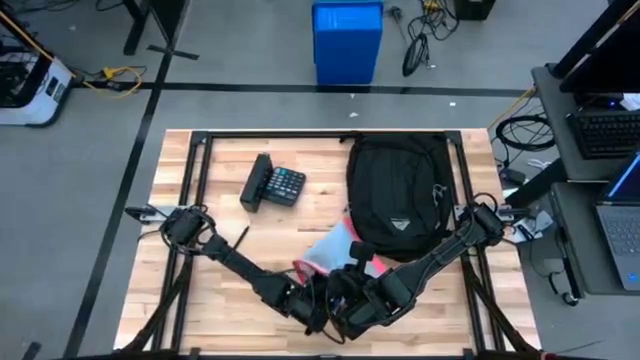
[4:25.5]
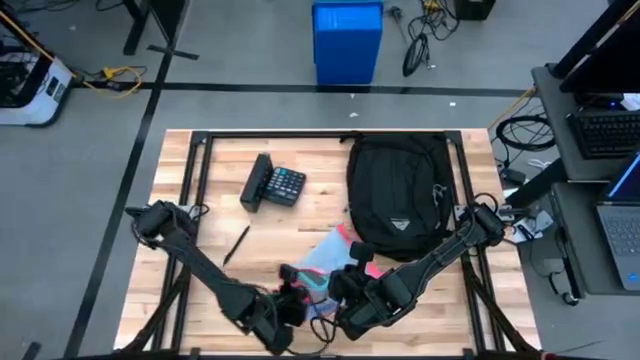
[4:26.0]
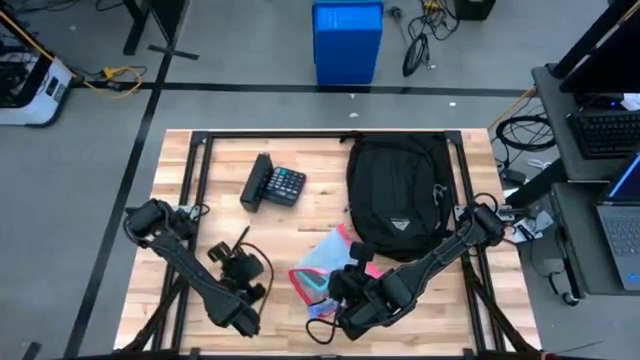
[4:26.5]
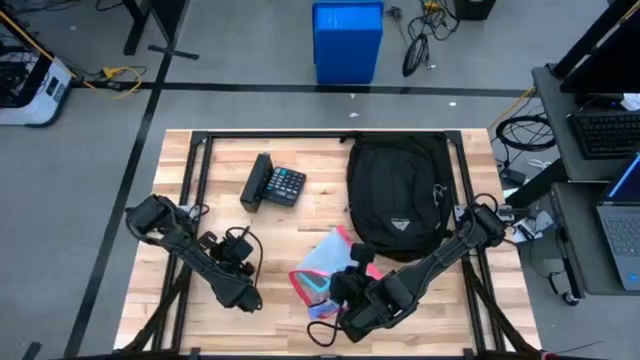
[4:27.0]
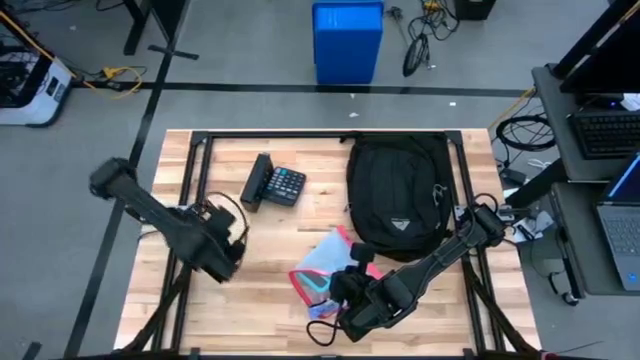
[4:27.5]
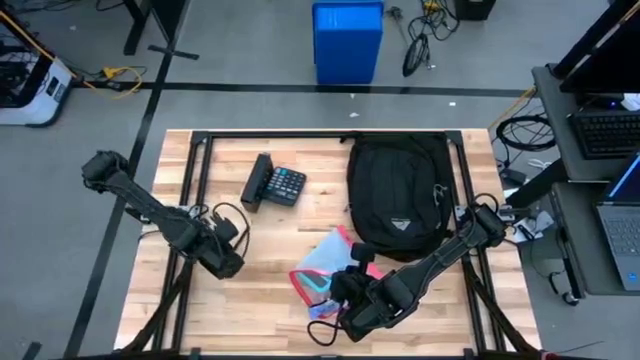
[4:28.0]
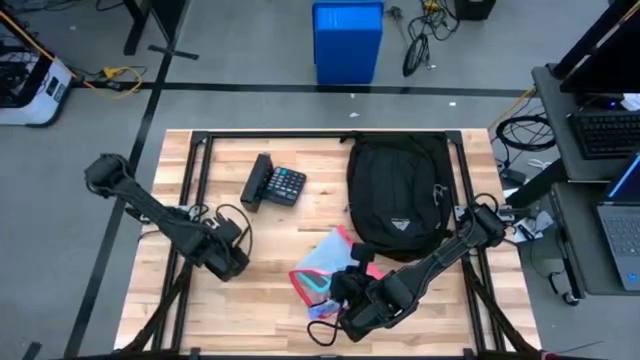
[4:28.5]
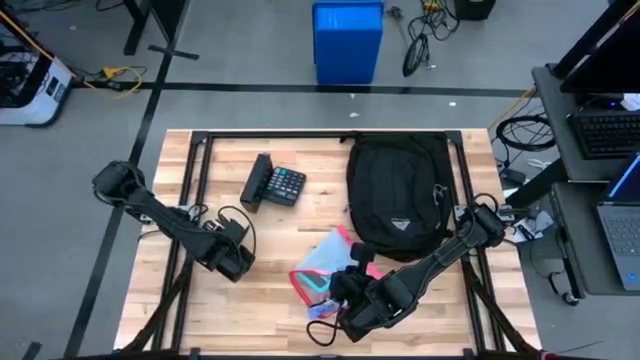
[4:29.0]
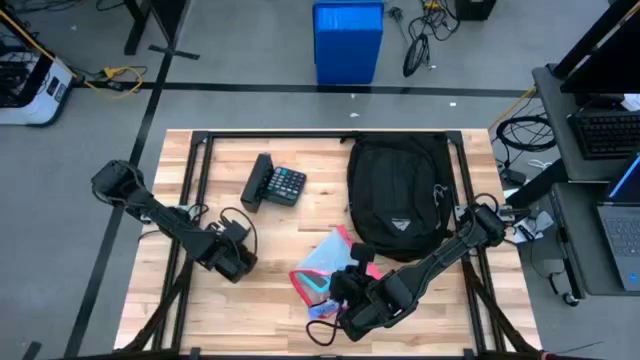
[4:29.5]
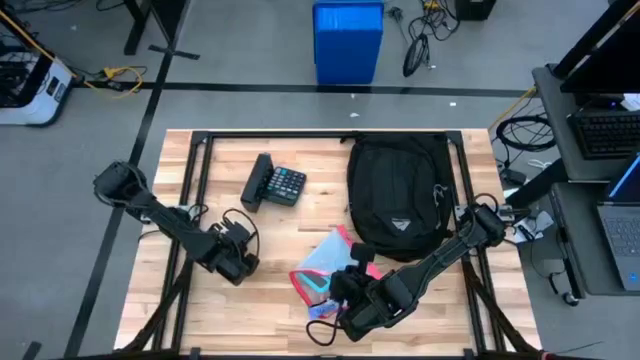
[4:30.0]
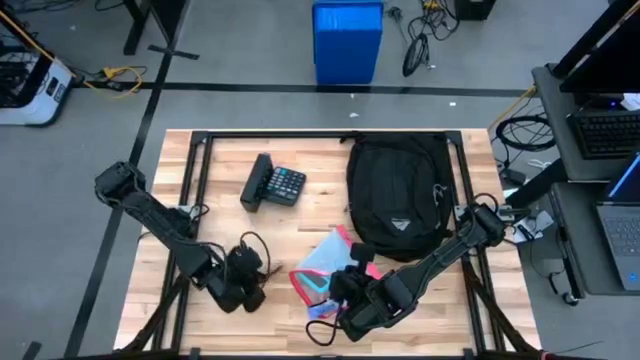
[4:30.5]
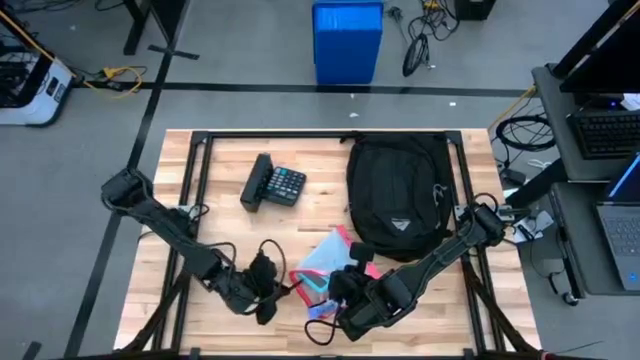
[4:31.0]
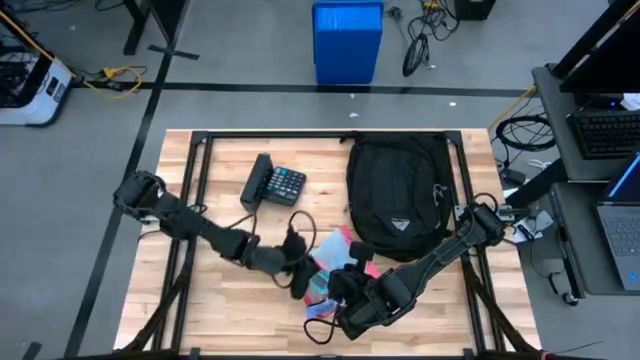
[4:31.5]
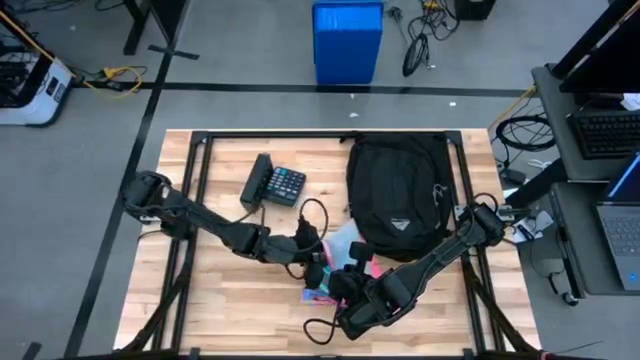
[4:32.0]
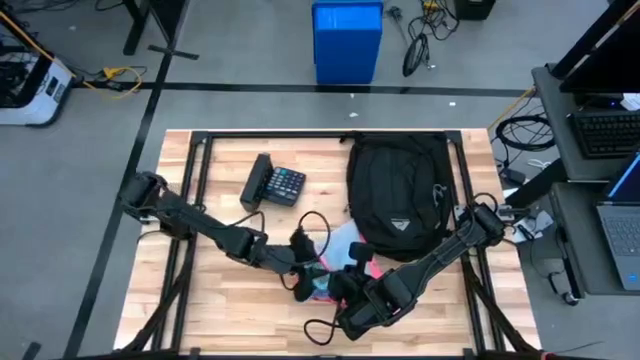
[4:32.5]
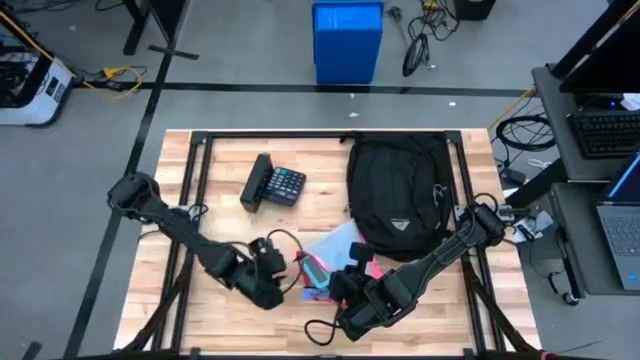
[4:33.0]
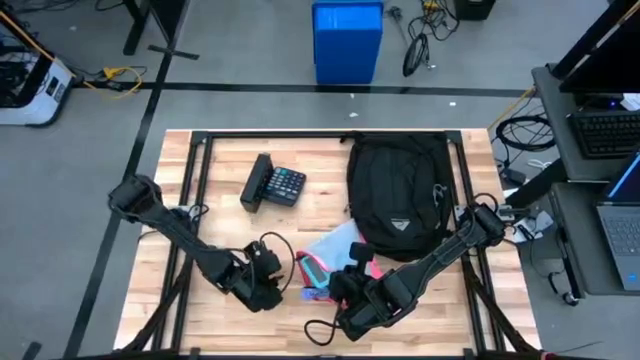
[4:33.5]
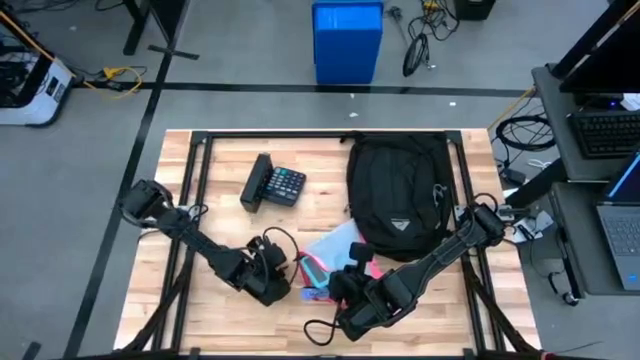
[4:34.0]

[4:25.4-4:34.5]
Task: Unpack backpack
Put the black pen into the white zip bag

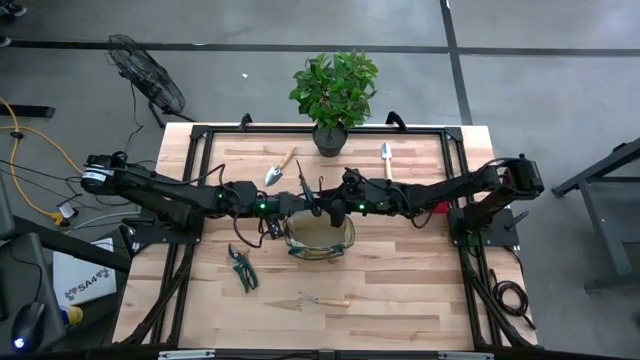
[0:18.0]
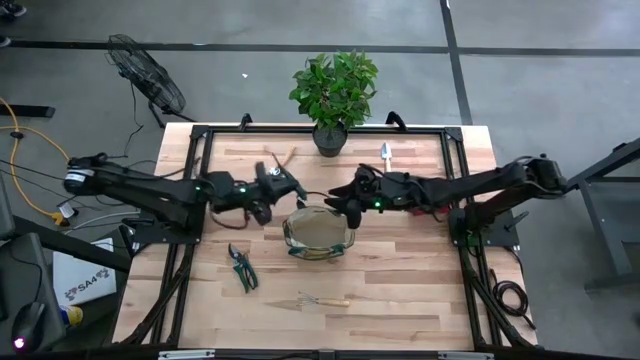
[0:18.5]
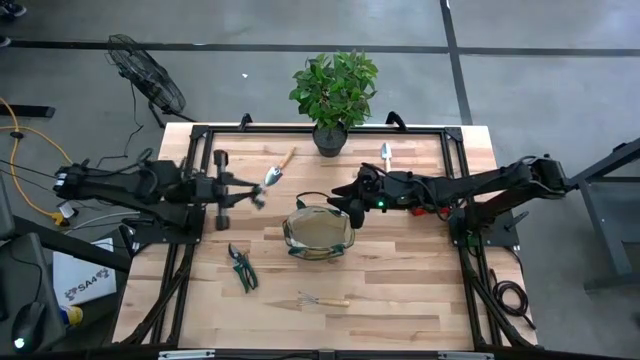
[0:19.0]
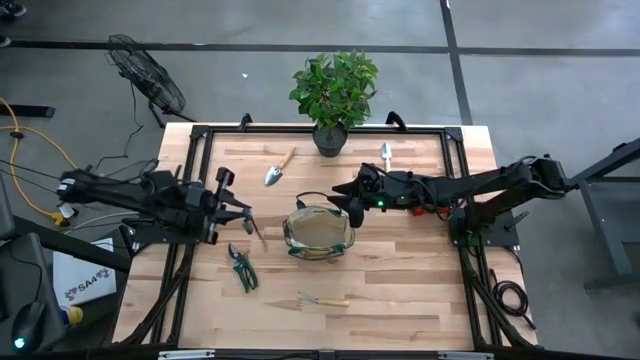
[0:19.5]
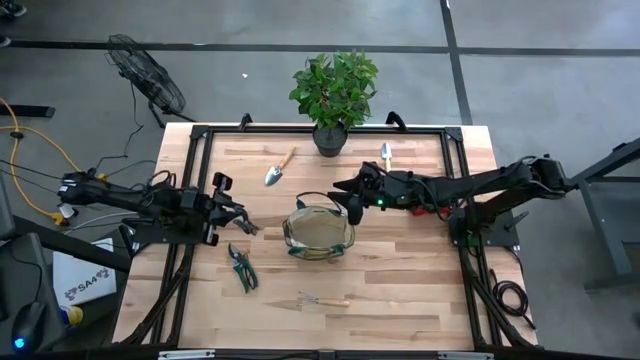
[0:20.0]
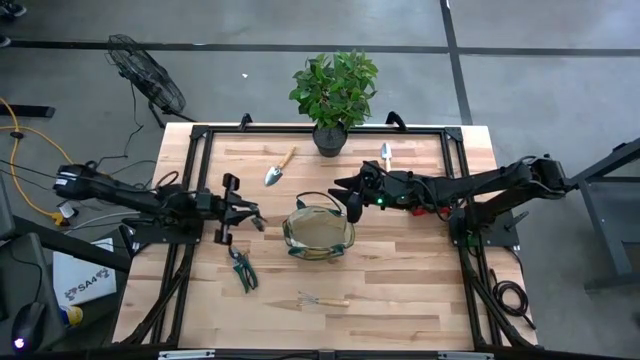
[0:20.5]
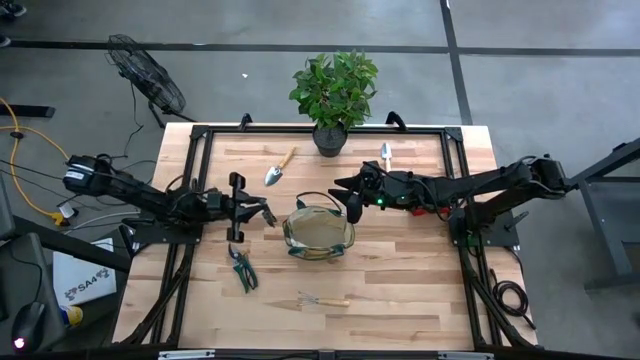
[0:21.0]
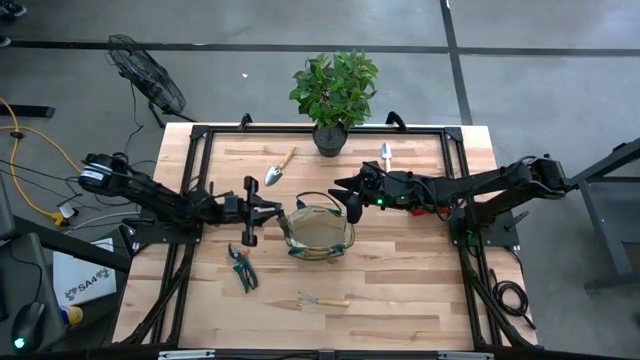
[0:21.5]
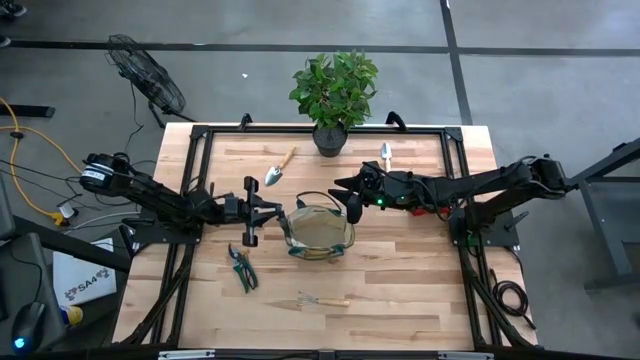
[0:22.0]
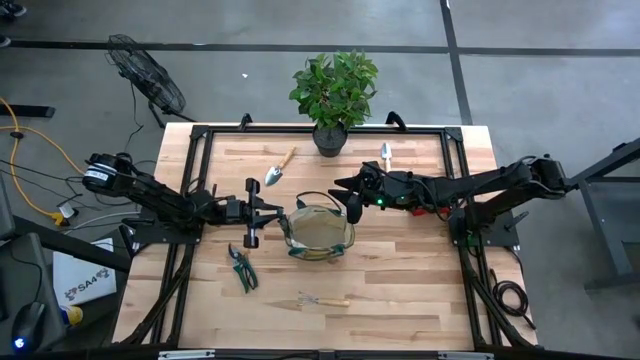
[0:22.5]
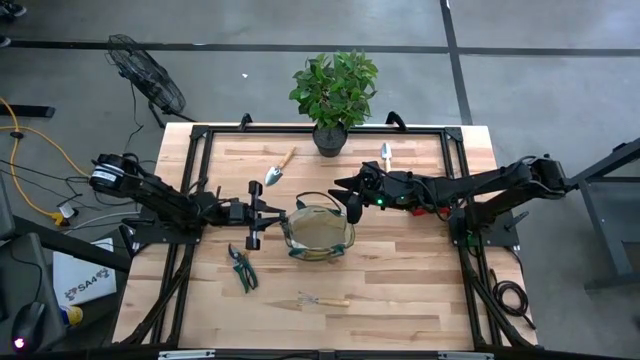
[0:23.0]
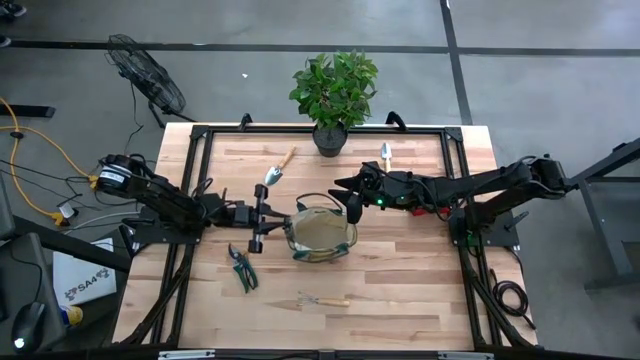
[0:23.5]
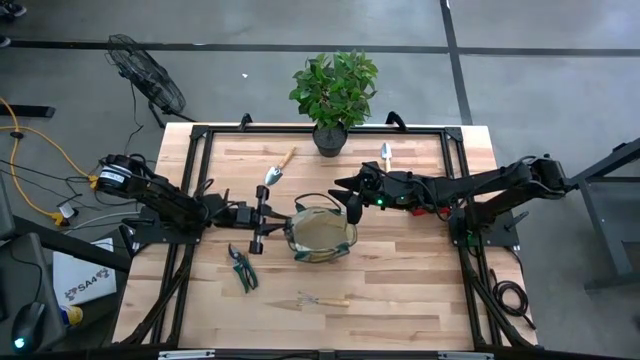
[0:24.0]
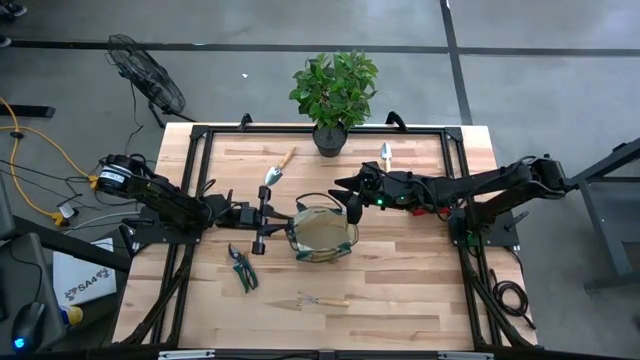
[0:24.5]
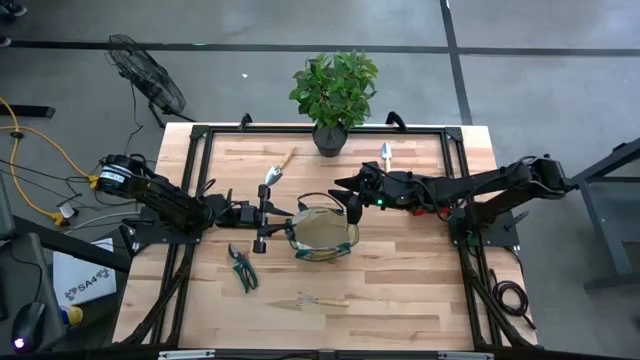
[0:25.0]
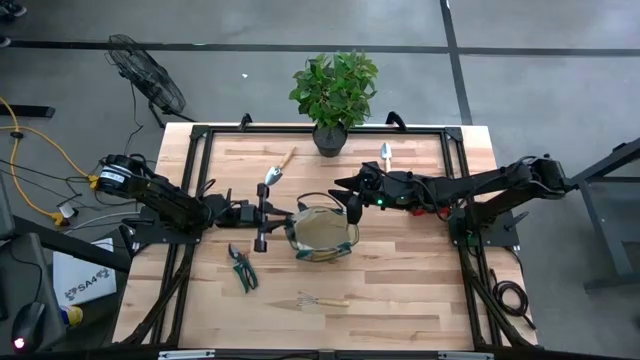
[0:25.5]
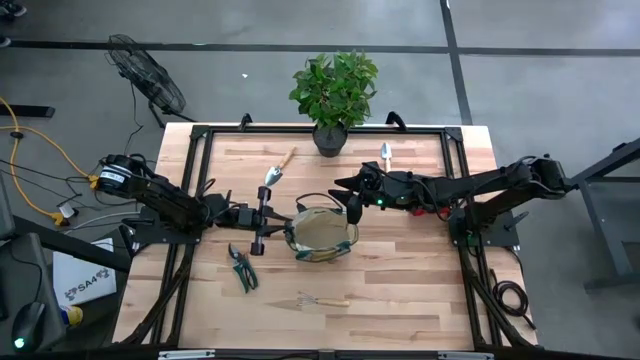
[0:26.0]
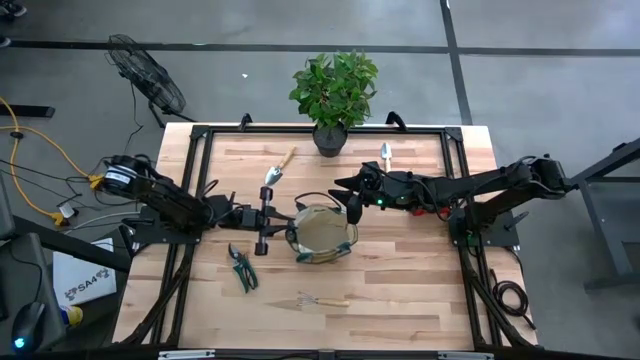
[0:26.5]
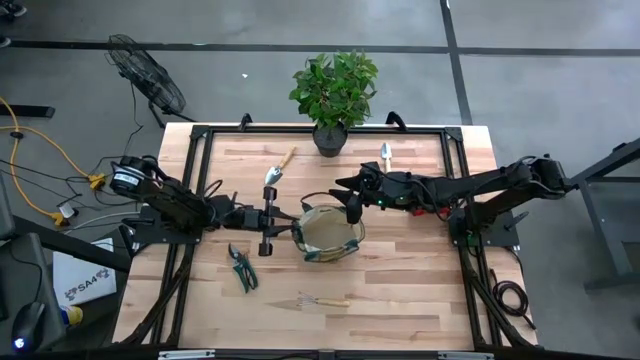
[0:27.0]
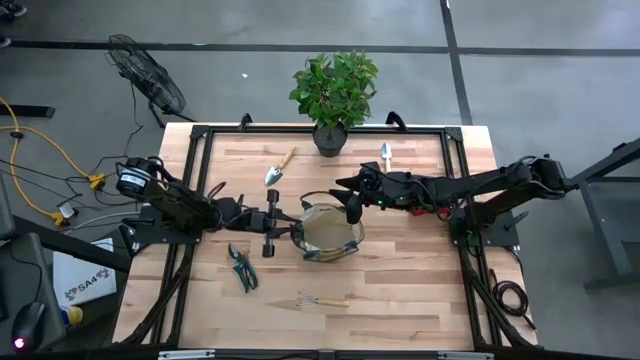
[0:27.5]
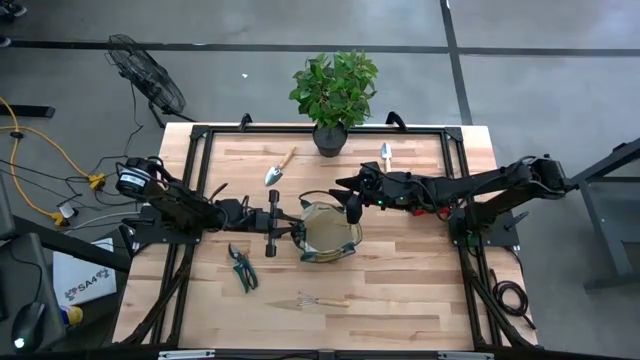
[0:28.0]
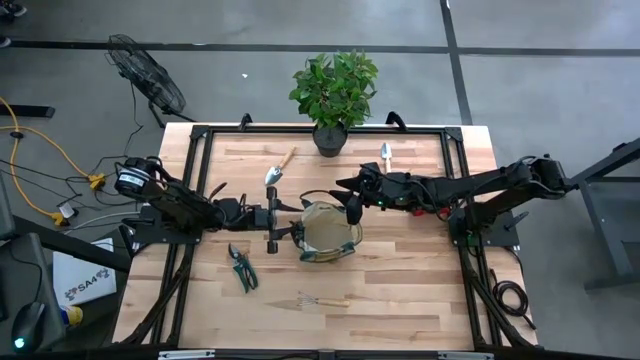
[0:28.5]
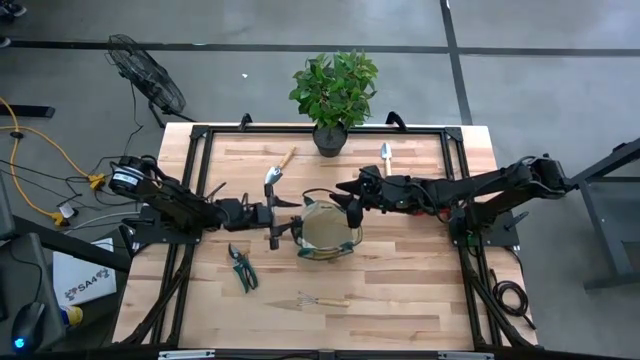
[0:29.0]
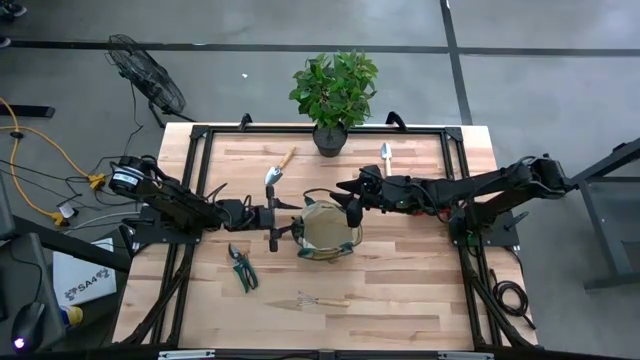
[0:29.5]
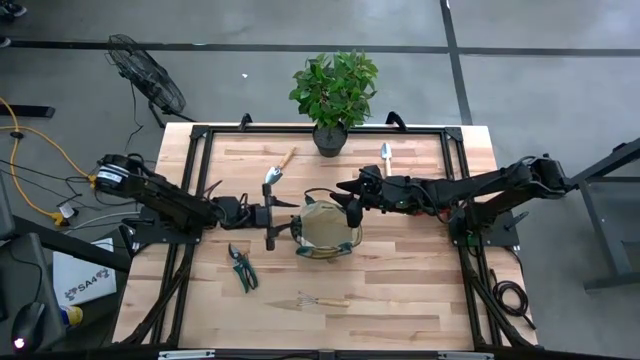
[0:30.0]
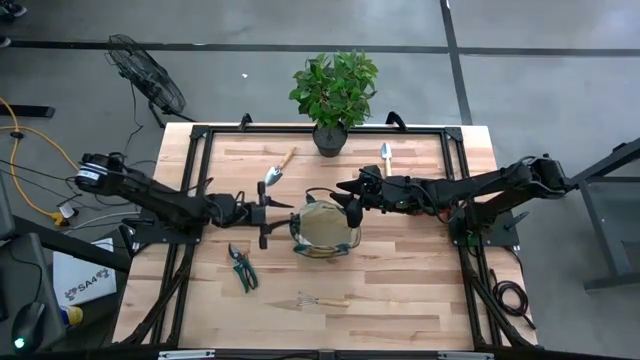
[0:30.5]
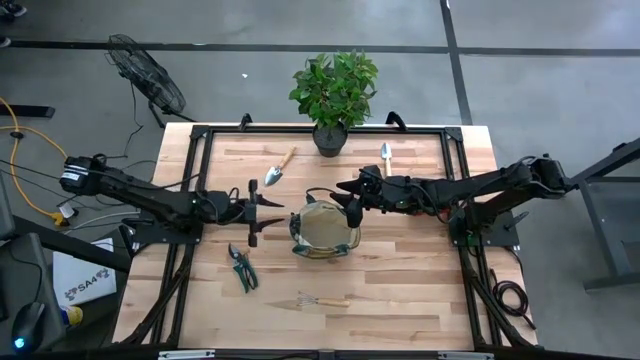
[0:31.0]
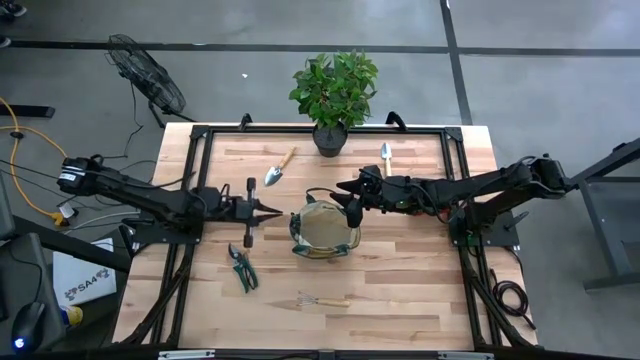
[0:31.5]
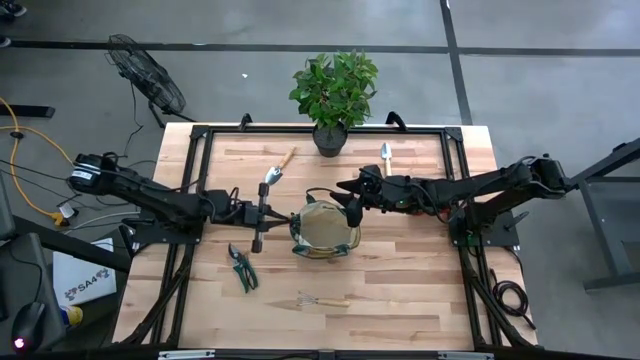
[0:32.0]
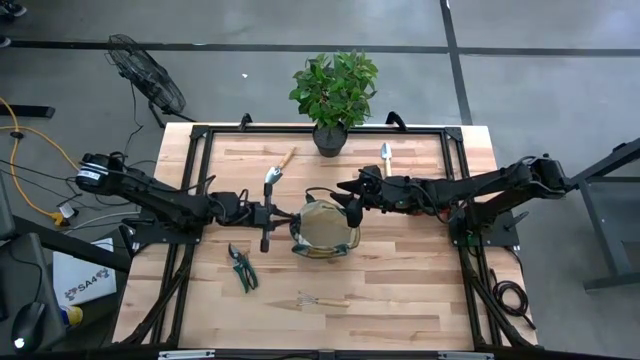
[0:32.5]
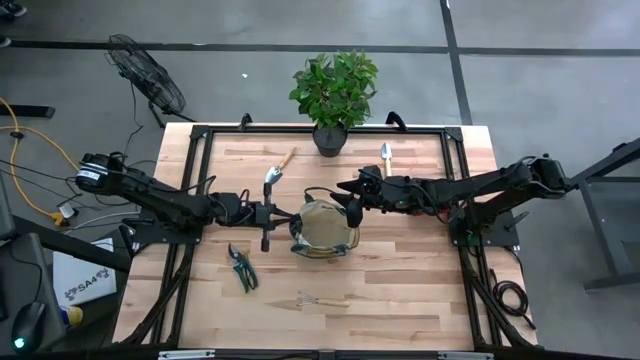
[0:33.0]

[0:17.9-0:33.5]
Task: Pick & Place Garden tools in Gardening bag
Put the right green shear scissors into the gardening bag
